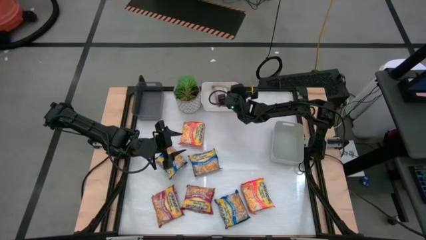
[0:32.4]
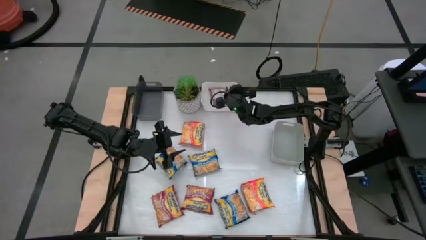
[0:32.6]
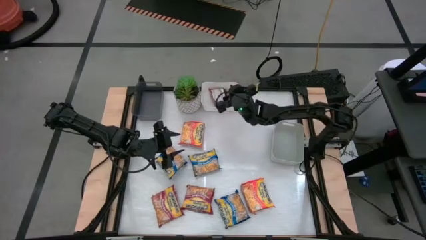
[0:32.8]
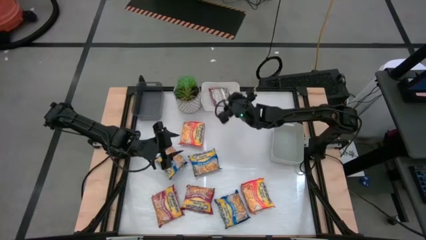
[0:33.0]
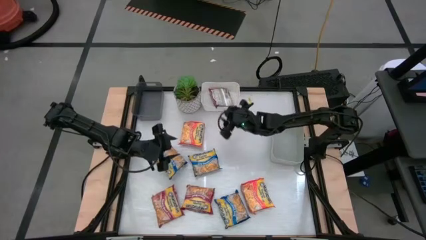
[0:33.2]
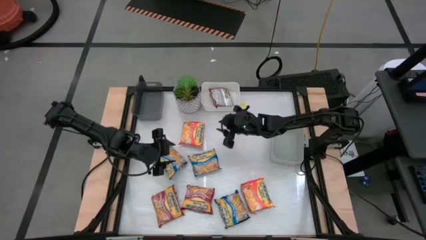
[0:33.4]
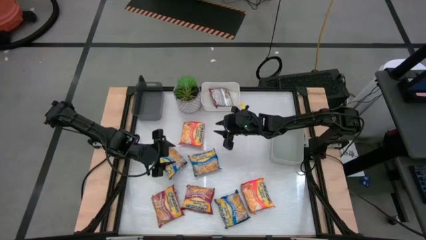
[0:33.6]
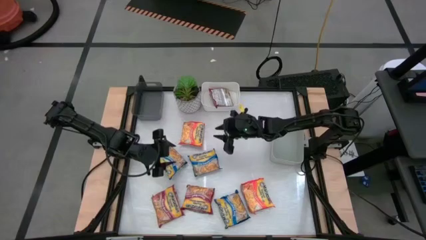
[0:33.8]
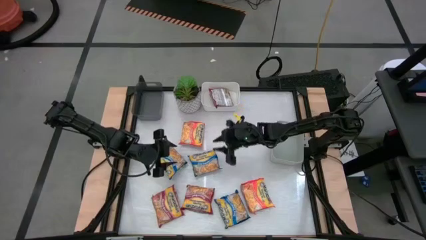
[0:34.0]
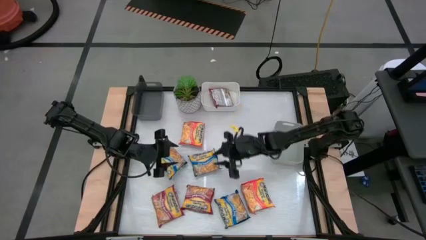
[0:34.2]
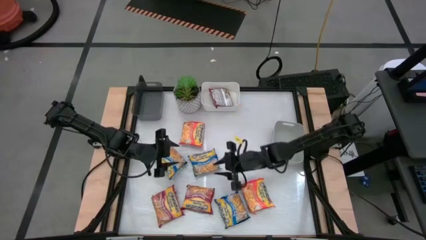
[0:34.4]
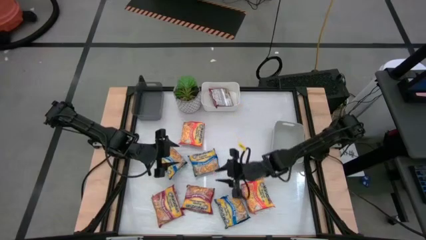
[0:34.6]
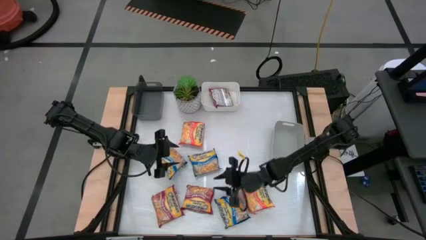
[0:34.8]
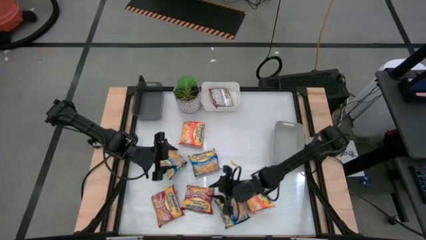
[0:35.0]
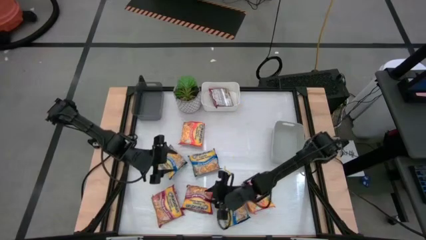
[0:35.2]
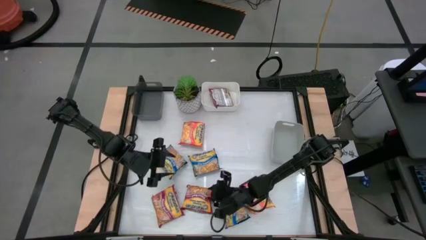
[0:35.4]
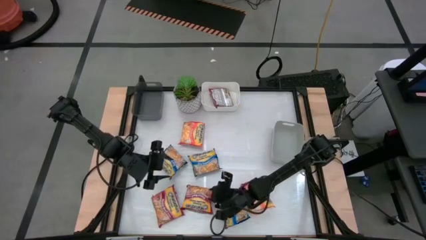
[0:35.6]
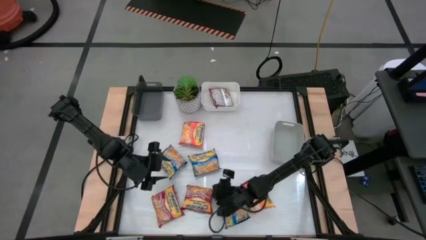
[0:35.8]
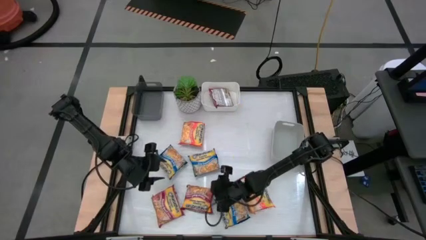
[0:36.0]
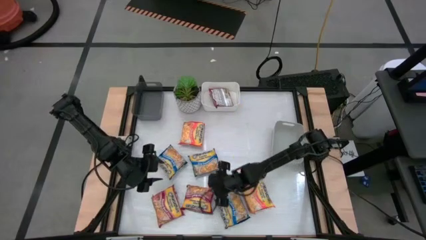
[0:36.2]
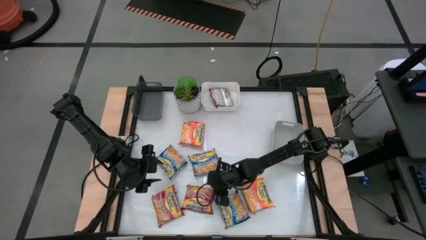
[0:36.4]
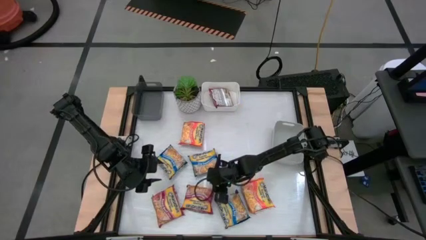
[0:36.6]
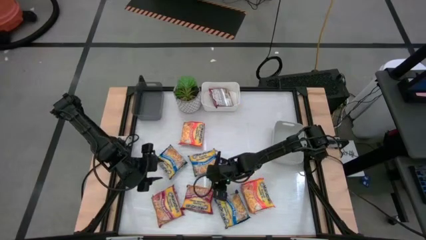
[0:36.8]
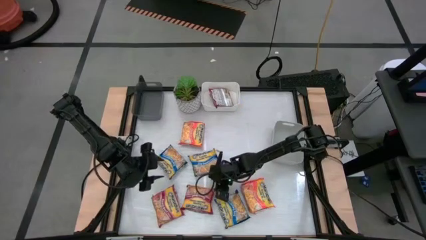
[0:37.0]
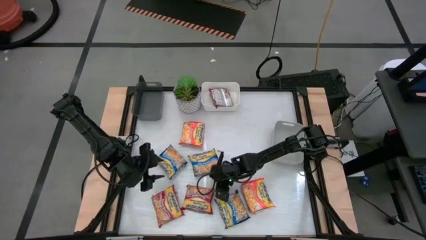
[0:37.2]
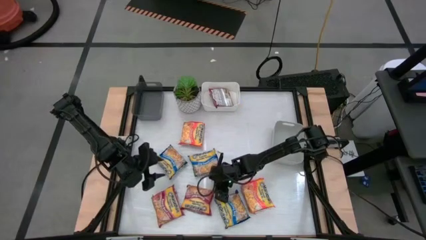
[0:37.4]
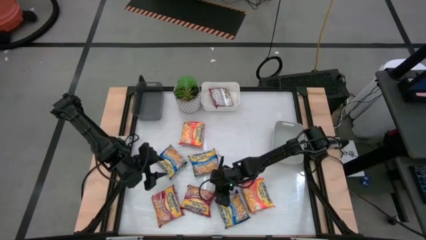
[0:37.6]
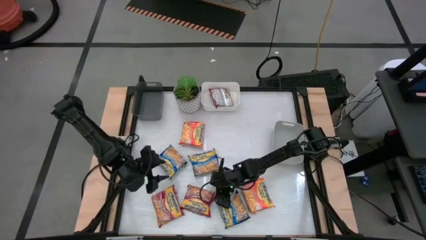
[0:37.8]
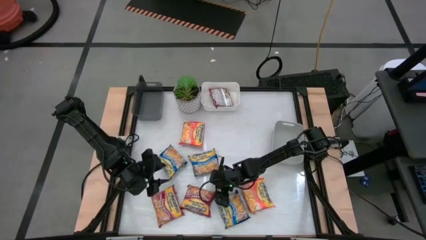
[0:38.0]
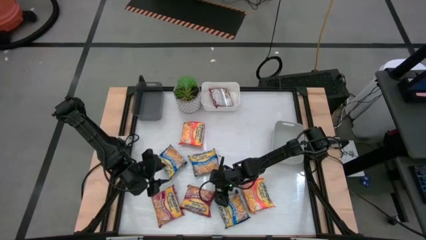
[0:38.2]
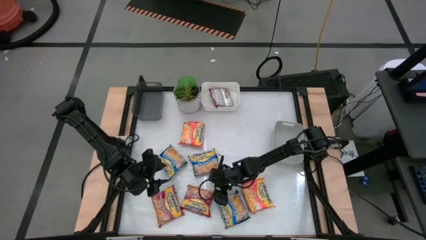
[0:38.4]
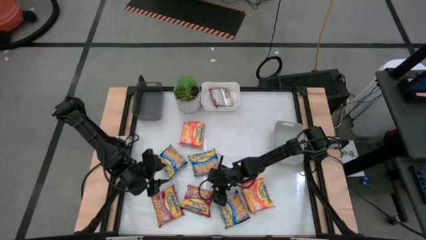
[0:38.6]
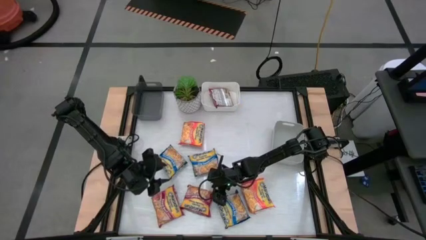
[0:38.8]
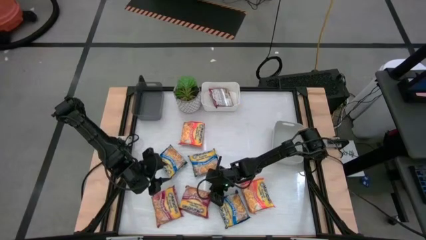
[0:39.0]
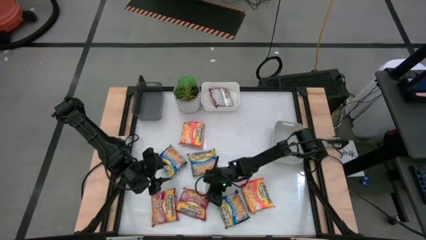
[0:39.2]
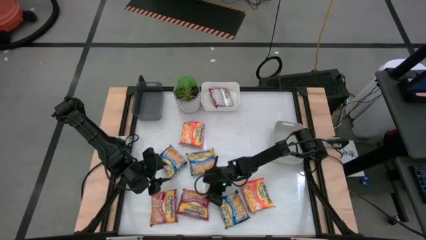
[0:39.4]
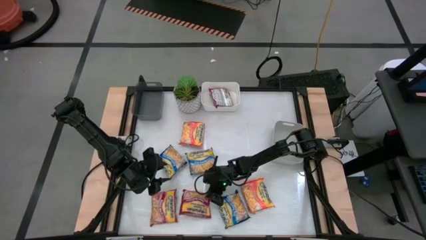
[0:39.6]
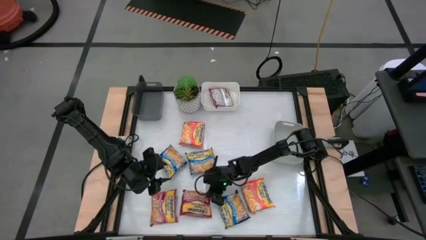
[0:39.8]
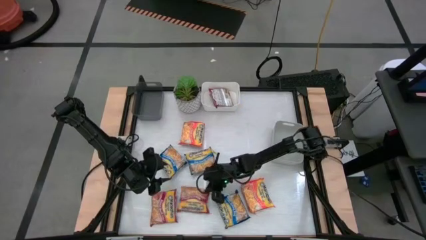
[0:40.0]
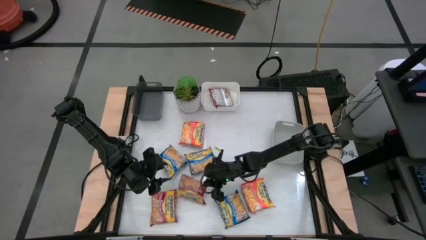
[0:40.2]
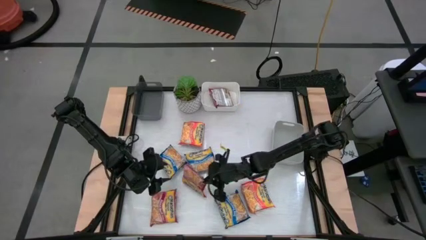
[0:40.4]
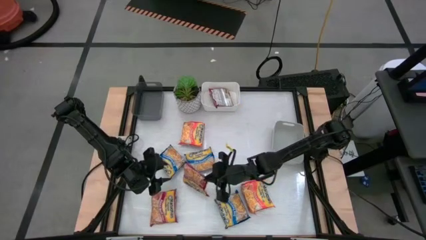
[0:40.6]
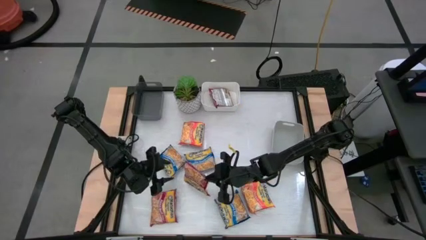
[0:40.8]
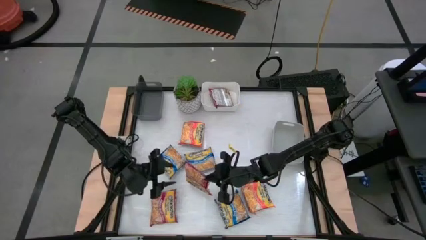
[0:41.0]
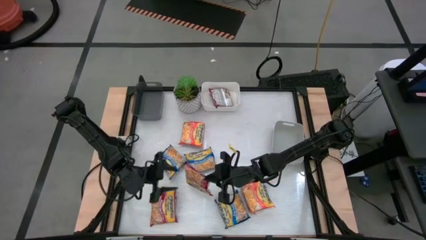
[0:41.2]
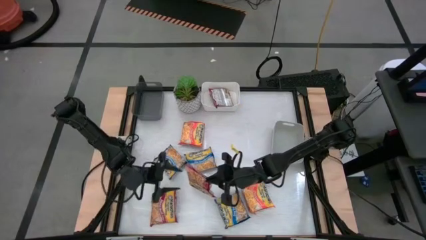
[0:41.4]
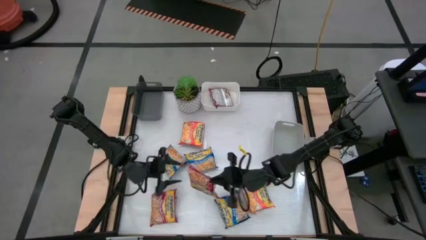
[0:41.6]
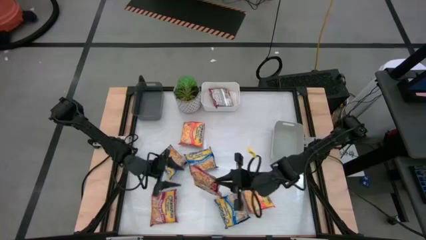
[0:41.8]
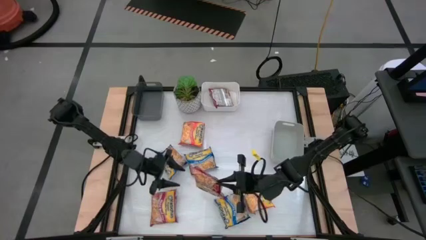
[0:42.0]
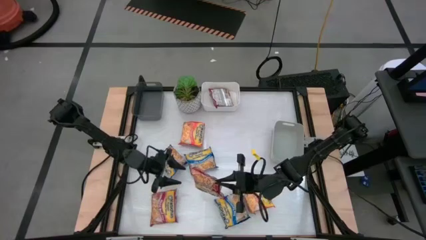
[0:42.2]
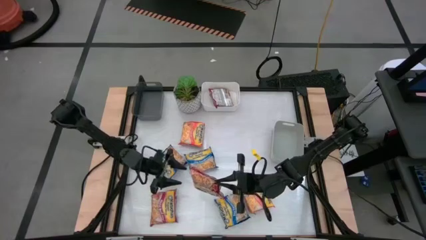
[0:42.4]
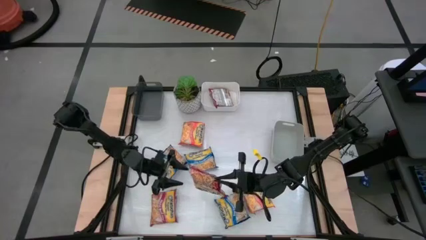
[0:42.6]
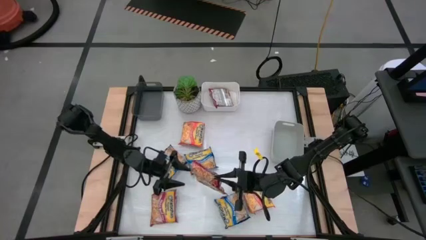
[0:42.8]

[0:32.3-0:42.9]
Task: Sort Maruchan noodles
Put the right red noodle pack into the white bin

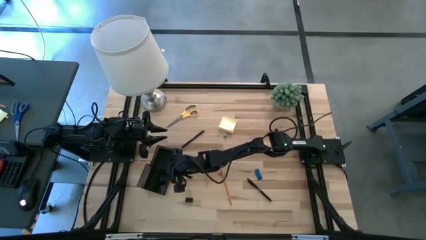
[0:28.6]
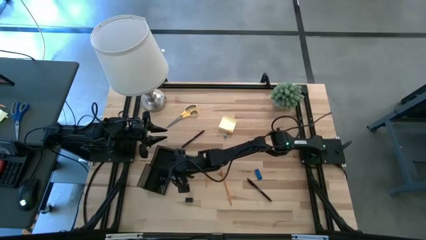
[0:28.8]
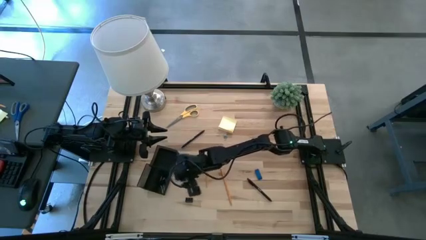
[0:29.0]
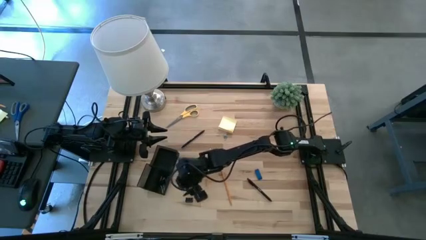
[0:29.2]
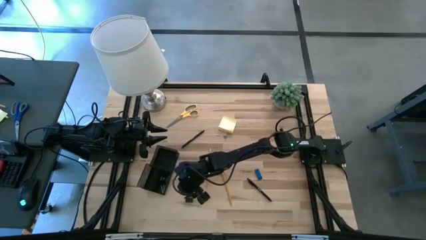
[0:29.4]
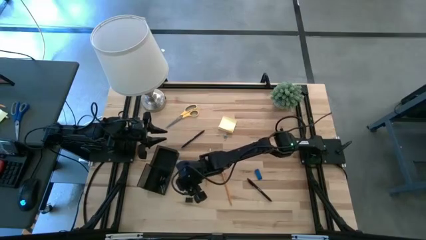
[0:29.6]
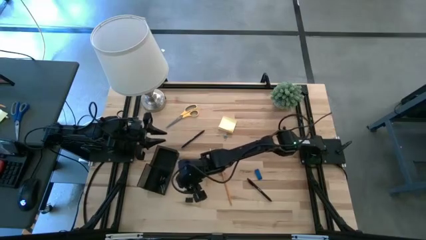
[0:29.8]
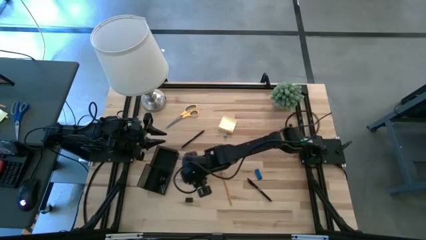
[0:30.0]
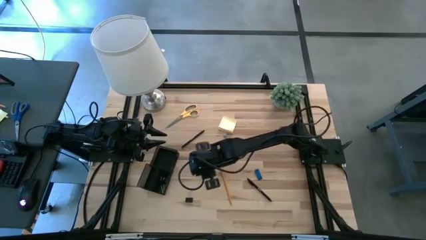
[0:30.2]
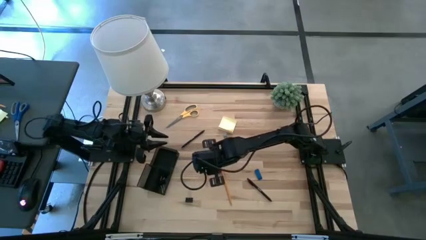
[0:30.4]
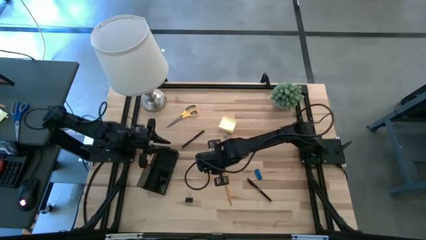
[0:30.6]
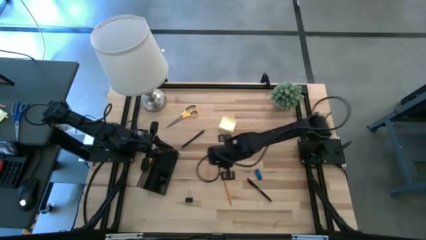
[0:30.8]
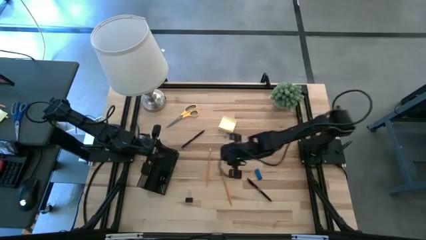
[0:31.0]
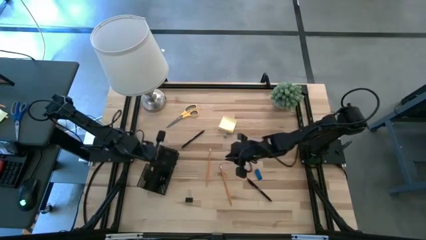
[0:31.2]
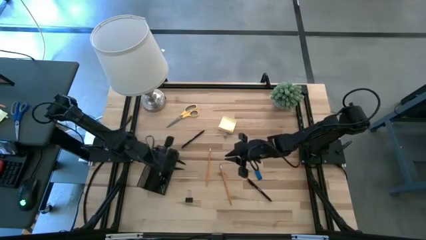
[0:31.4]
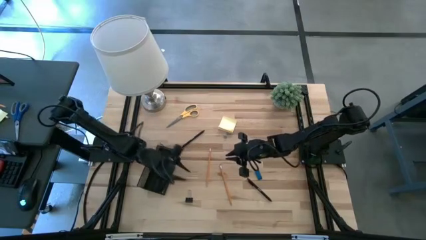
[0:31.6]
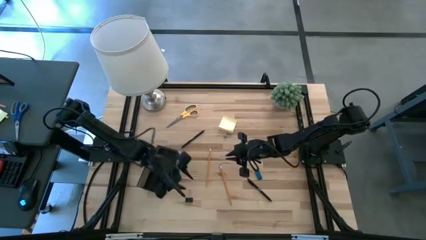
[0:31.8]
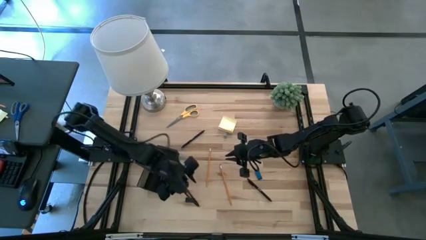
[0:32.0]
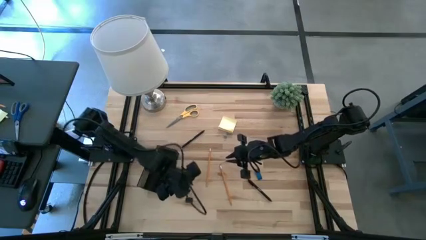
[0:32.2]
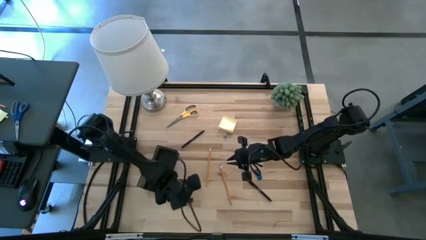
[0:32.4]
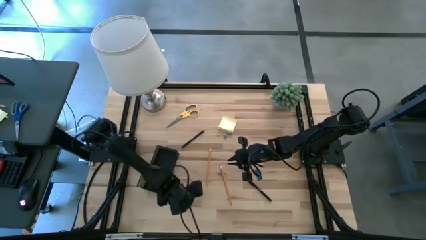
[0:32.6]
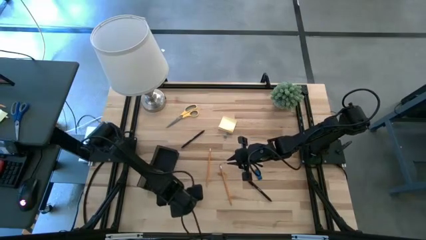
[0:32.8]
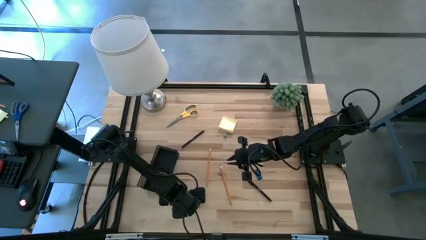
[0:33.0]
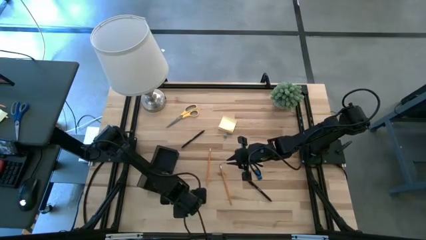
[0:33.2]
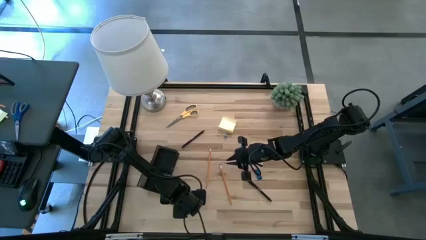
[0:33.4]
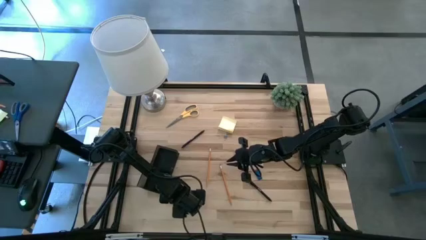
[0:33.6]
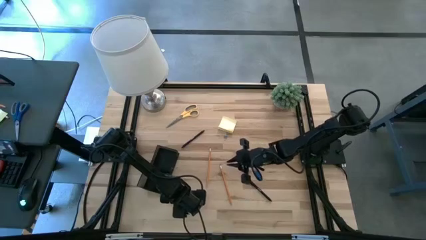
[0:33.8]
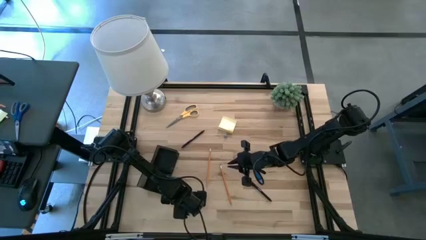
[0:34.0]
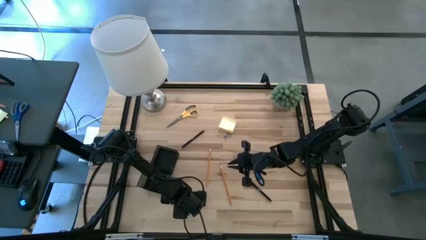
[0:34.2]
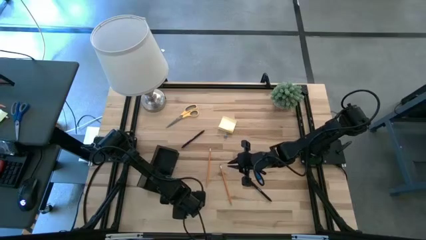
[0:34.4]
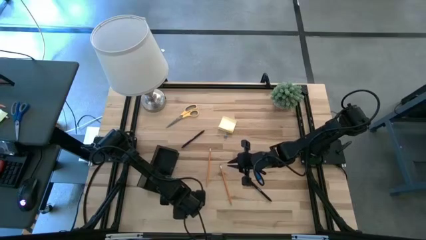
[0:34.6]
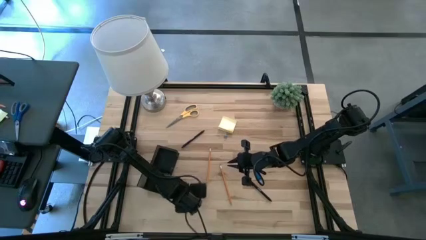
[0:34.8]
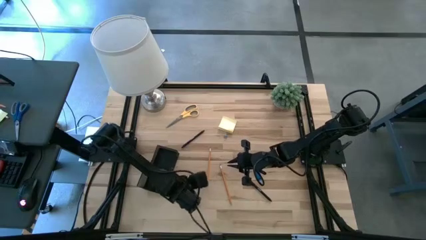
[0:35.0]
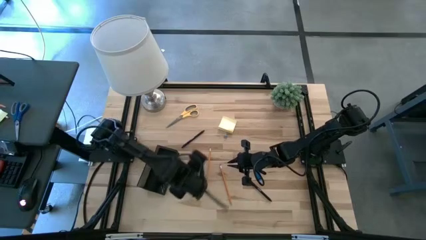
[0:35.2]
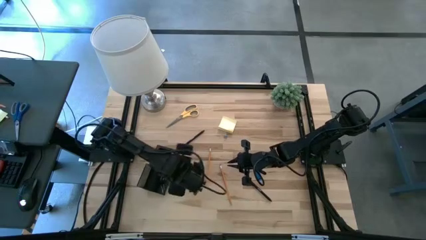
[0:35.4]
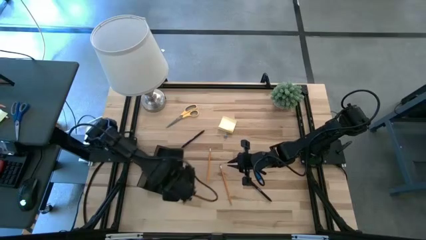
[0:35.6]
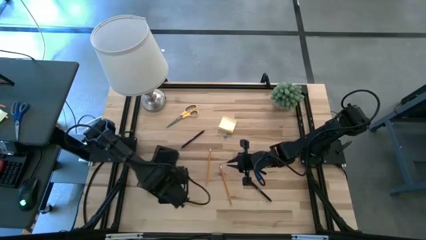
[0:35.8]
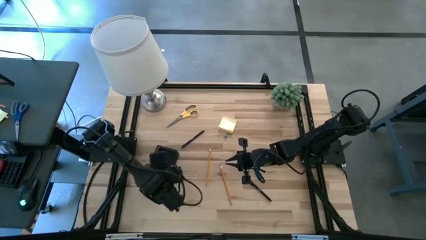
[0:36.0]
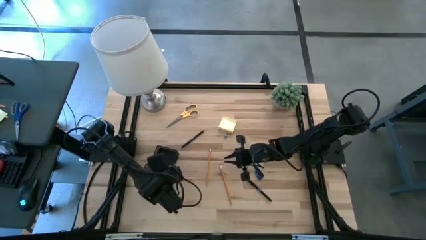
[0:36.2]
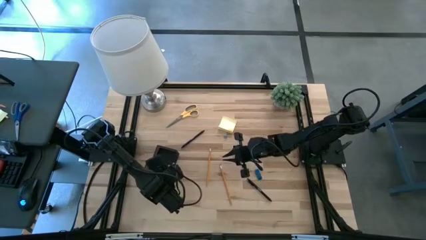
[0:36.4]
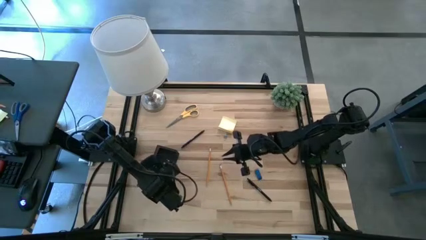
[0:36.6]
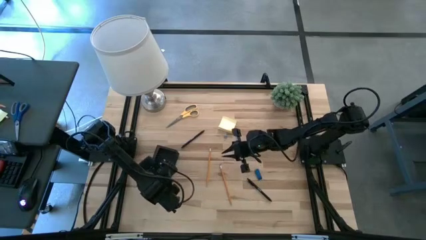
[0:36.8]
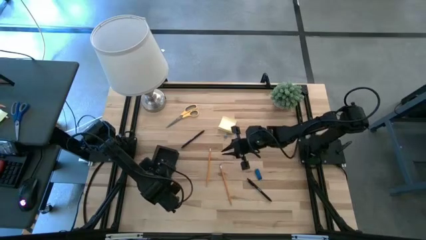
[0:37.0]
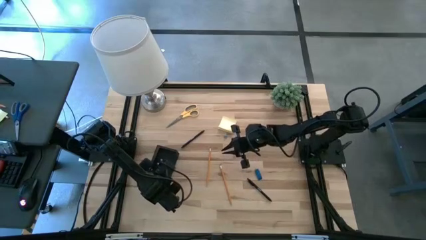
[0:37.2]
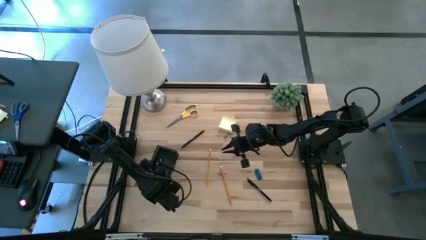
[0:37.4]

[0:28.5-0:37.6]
Task: Pick and place office supplies into organizer
Put the black binder clip into the black desk organizer
